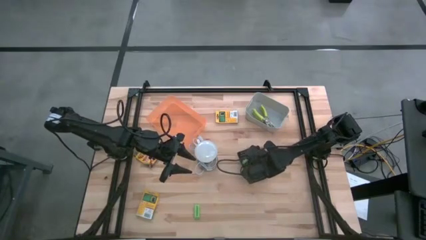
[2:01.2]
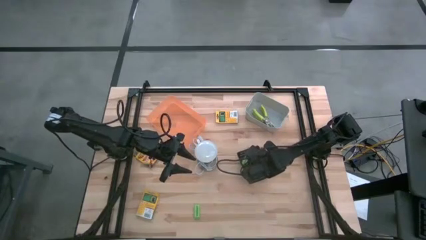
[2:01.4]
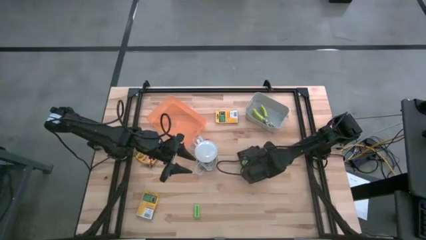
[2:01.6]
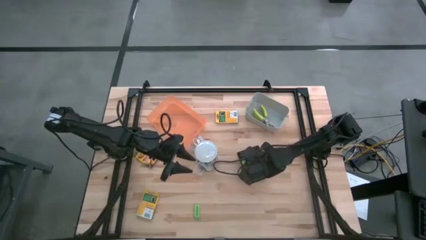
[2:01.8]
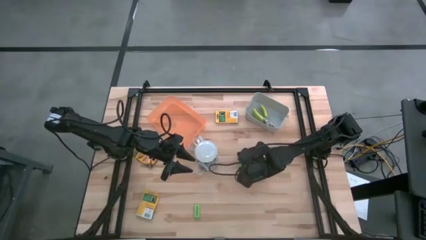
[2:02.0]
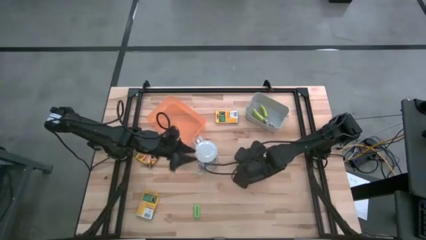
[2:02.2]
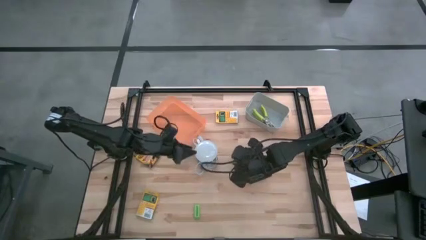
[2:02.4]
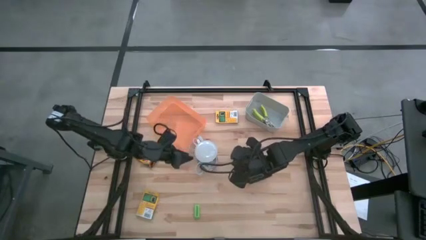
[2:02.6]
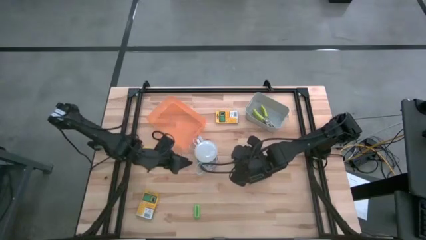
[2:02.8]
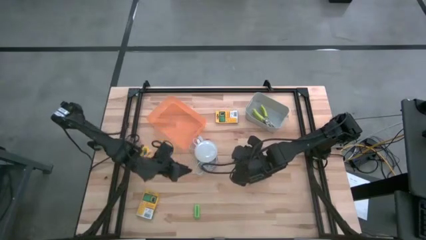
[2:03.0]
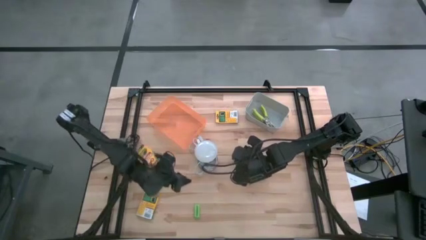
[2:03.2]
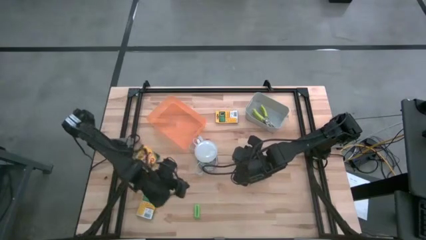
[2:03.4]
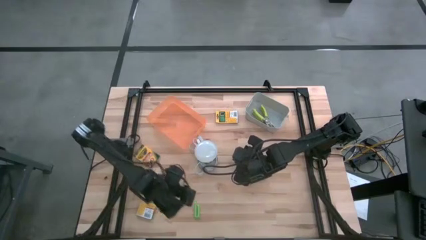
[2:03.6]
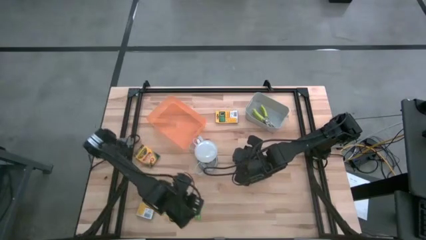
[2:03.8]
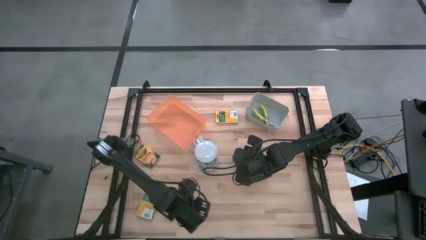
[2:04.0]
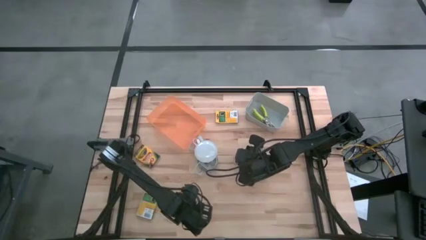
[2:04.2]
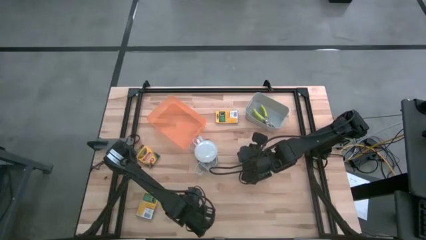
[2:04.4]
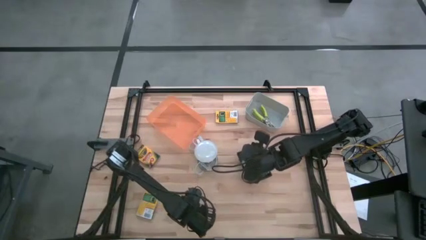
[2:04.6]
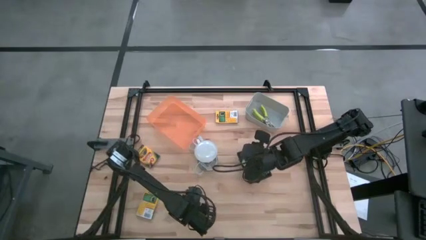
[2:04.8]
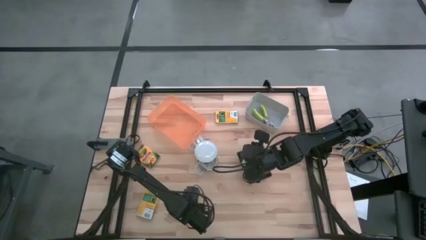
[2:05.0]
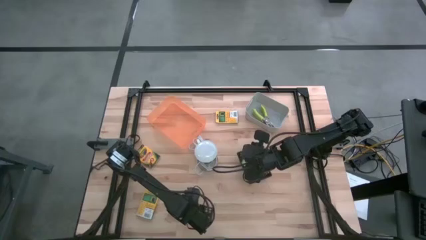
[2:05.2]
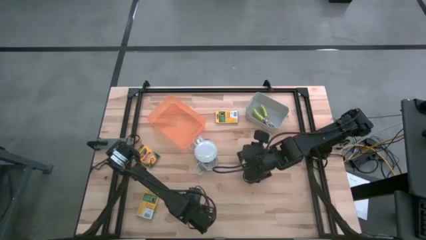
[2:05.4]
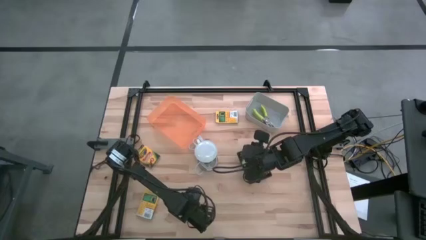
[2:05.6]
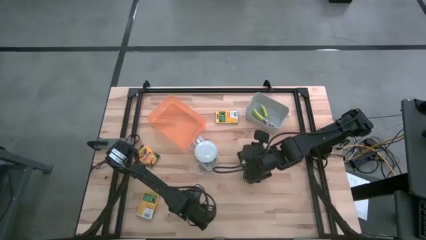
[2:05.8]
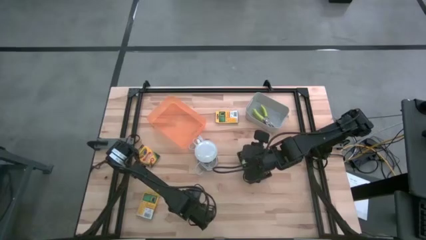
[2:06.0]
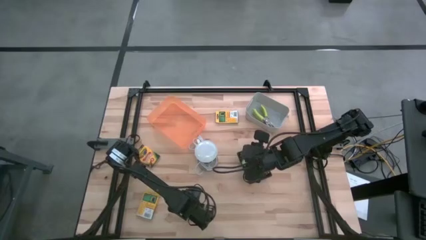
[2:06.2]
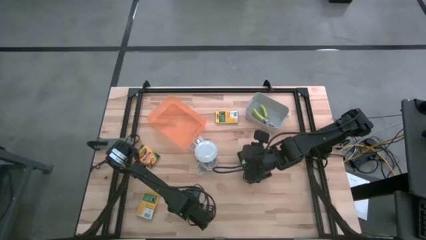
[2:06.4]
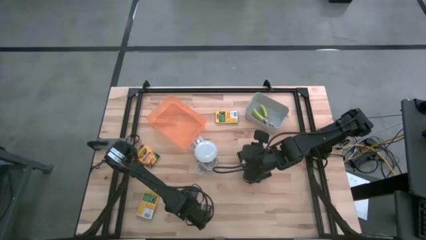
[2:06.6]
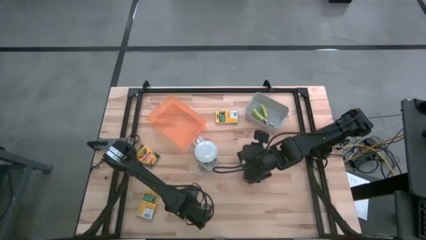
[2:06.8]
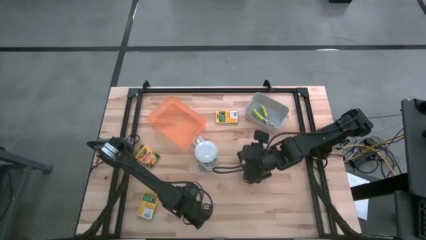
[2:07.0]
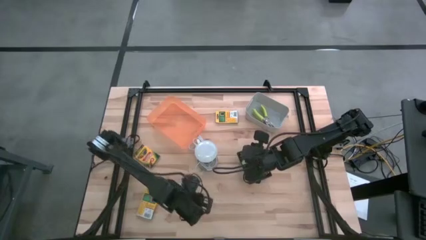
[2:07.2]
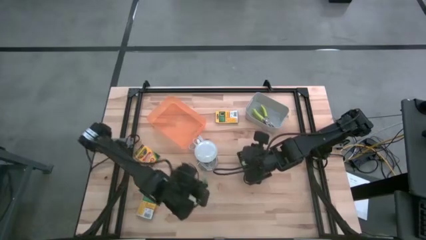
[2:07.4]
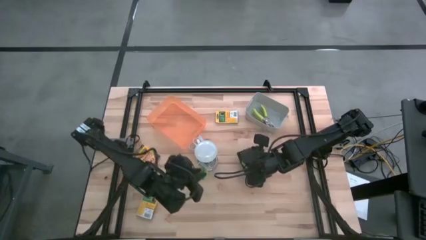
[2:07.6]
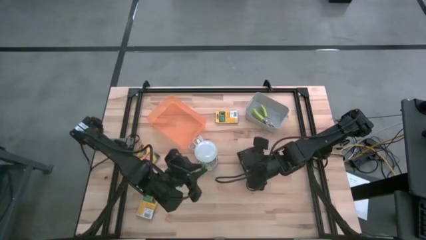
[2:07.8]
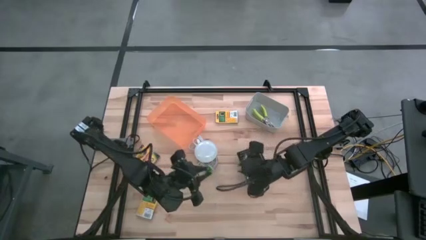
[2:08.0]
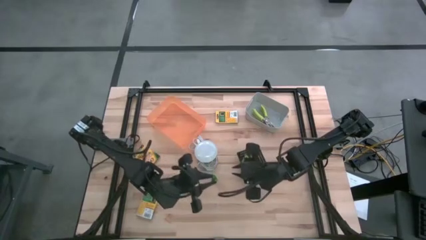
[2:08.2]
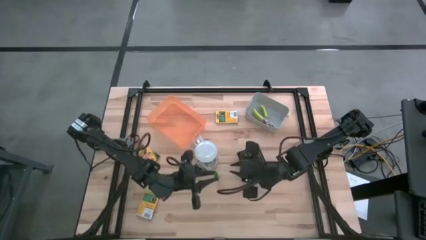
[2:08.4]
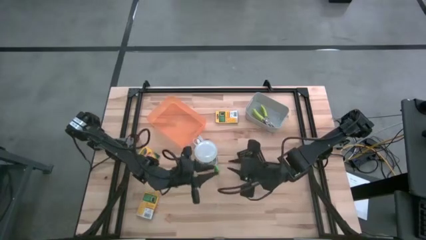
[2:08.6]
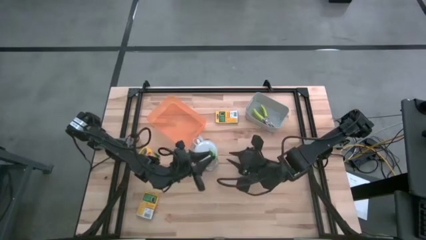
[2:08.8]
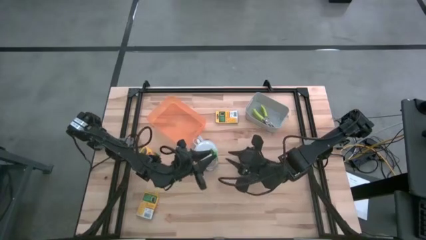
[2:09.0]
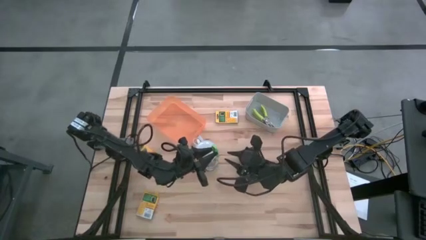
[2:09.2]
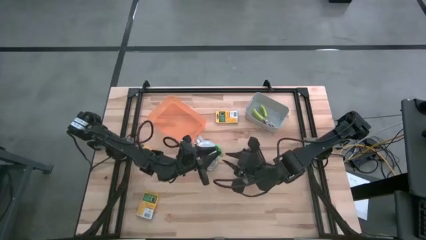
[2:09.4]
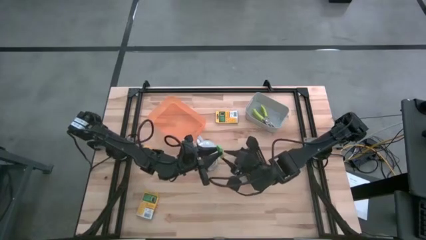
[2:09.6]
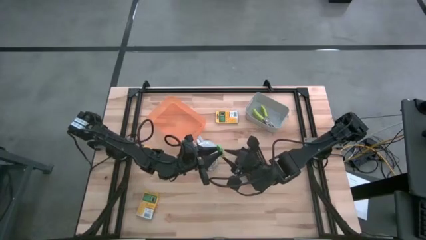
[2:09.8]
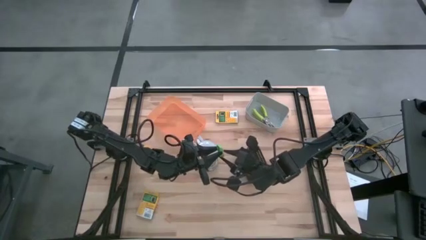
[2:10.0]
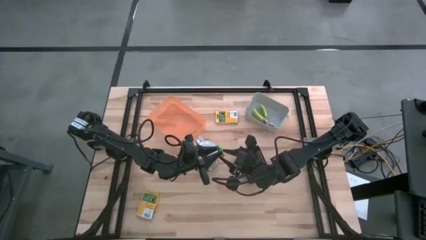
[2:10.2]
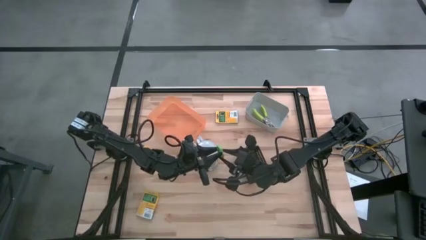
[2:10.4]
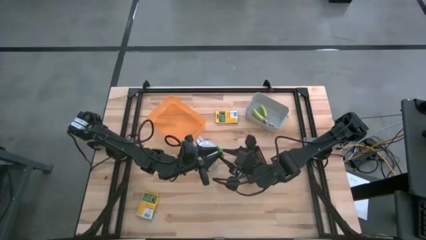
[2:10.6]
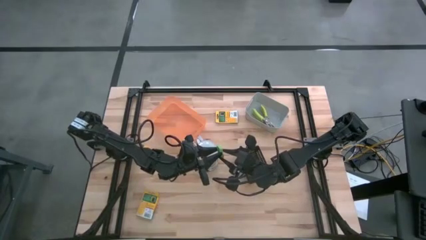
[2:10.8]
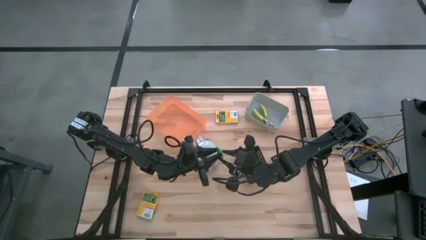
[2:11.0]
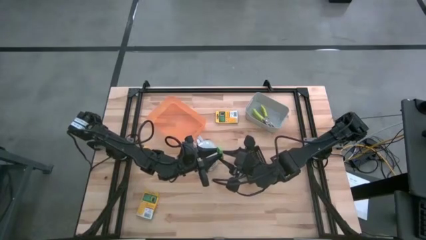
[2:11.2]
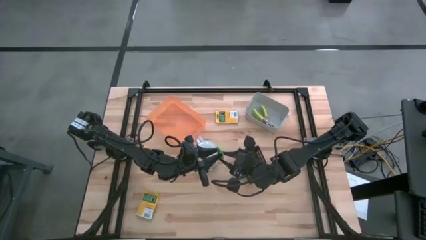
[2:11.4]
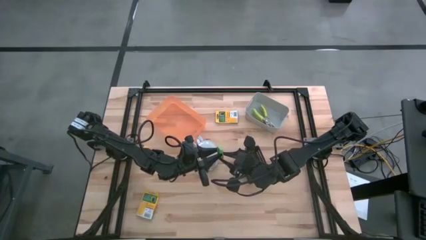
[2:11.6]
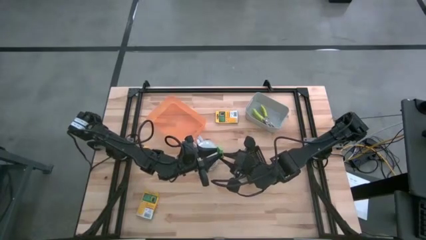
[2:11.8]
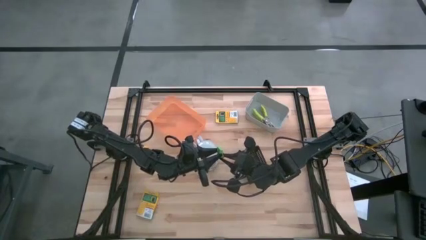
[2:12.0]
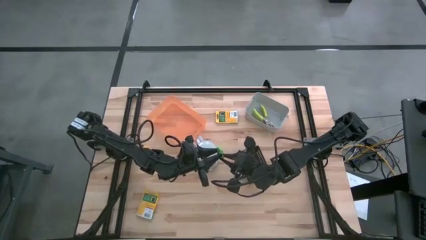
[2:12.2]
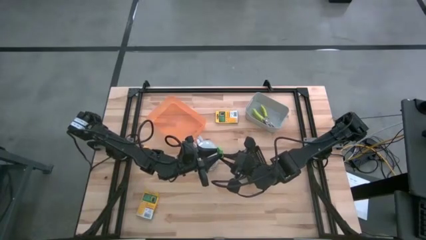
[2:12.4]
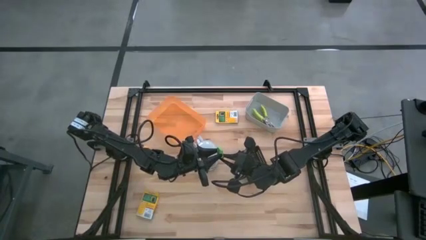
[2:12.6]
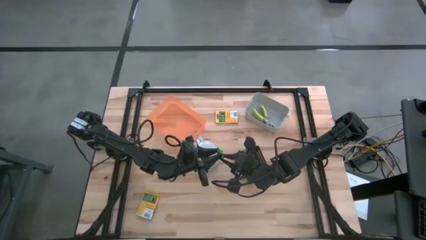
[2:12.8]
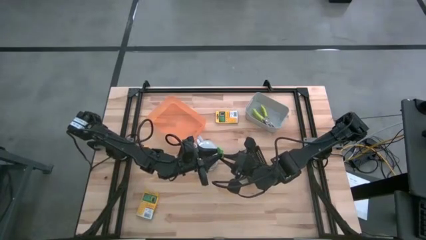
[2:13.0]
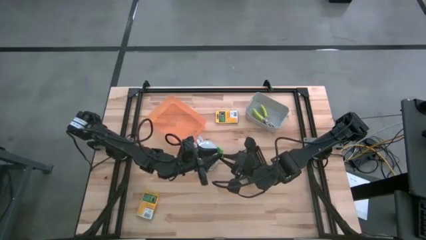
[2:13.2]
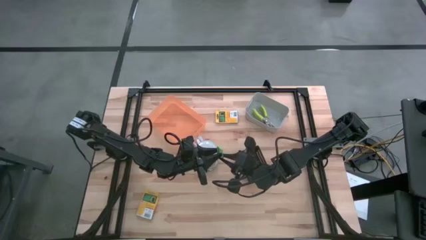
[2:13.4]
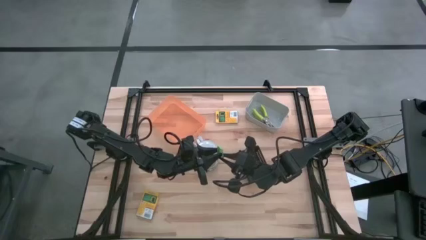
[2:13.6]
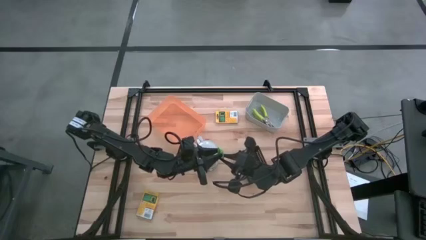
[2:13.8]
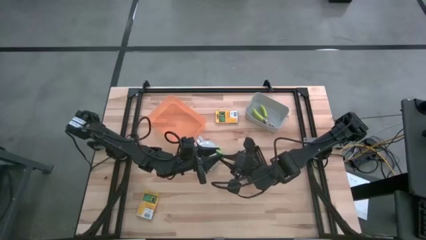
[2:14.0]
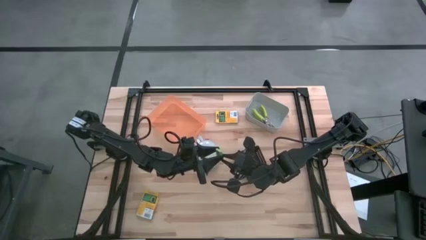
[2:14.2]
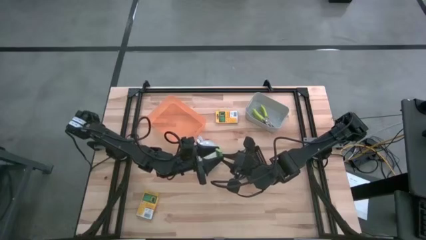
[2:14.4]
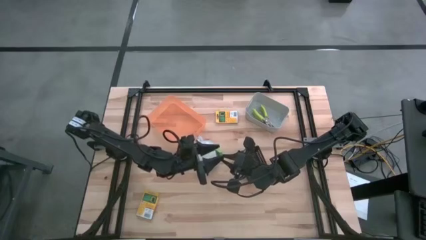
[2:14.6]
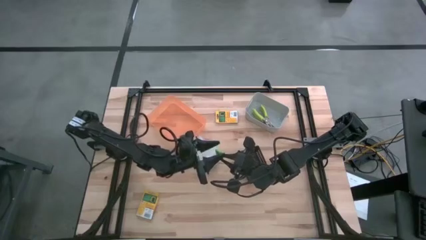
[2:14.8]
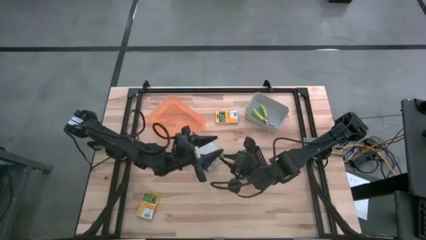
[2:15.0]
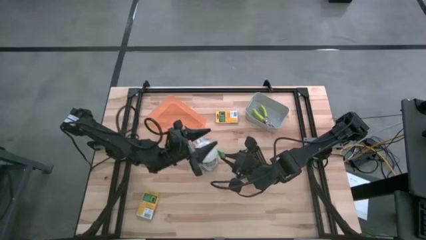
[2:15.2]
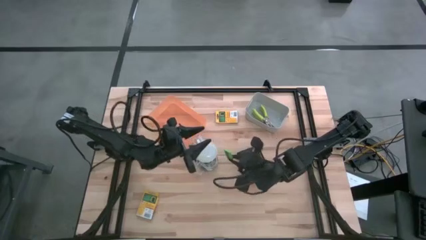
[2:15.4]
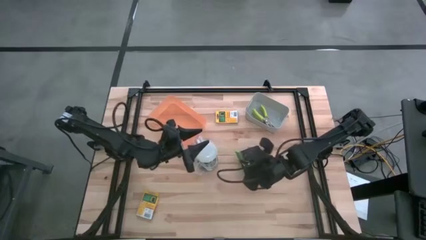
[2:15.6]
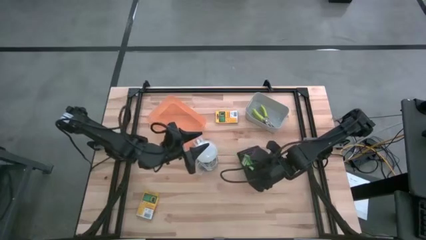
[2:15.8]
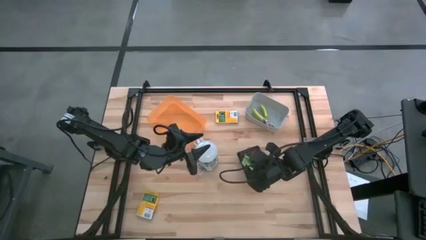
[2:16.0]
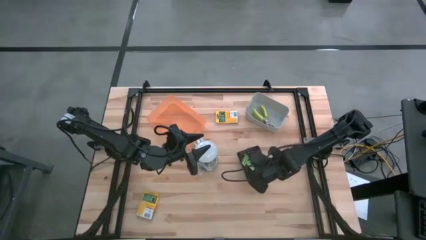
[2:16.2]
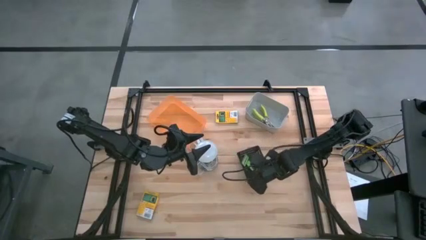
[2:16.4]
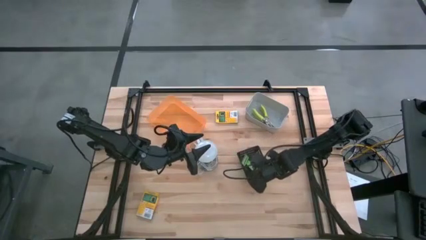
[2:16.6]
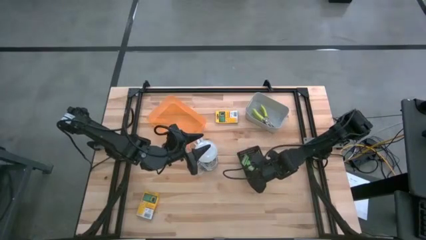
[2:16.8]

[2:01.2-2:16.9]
Task: Pick & Place School Supplies
Put the green eraser into the black bin
